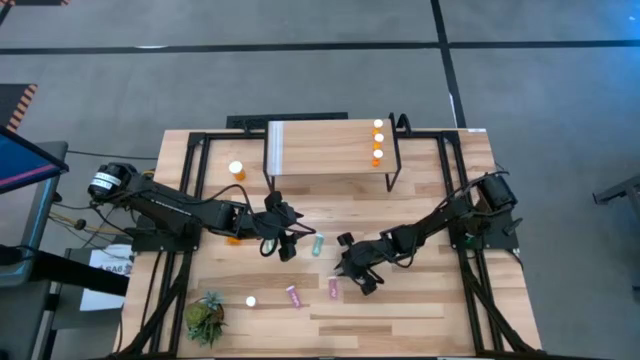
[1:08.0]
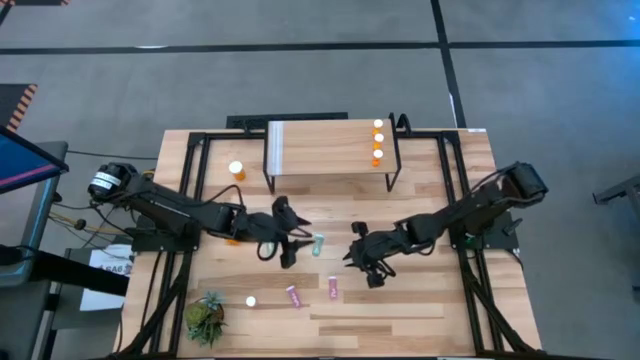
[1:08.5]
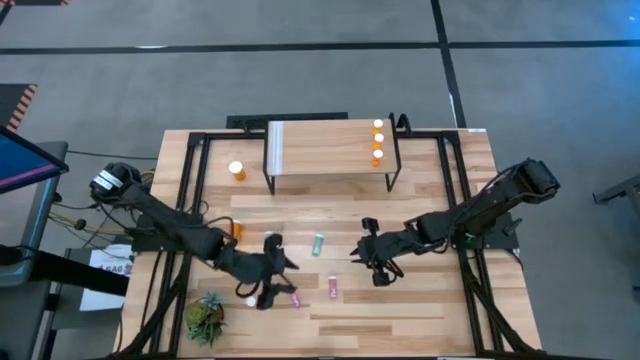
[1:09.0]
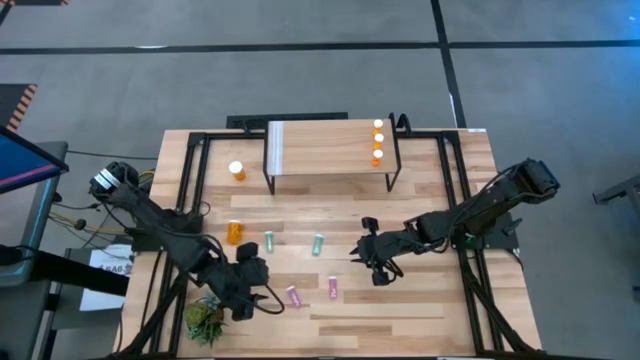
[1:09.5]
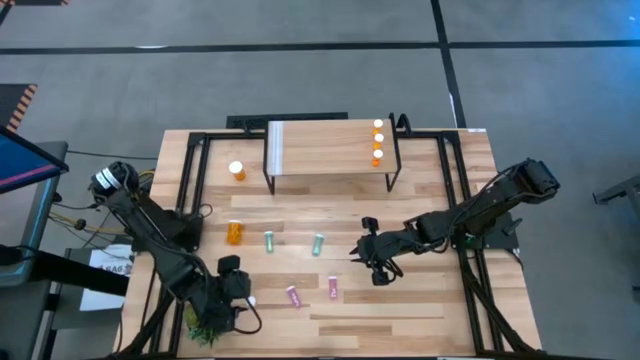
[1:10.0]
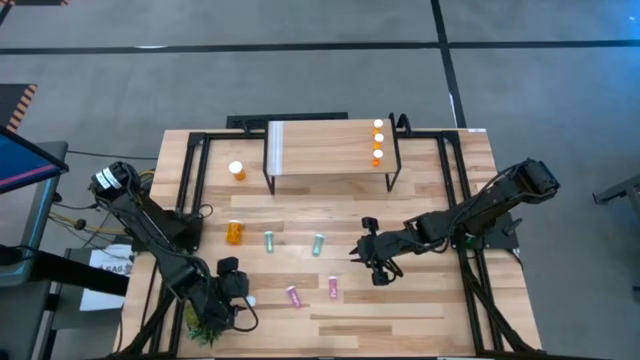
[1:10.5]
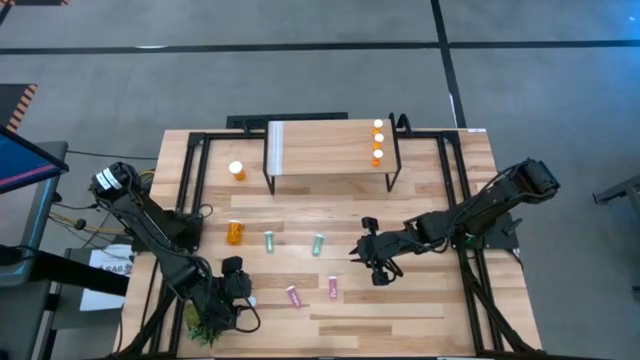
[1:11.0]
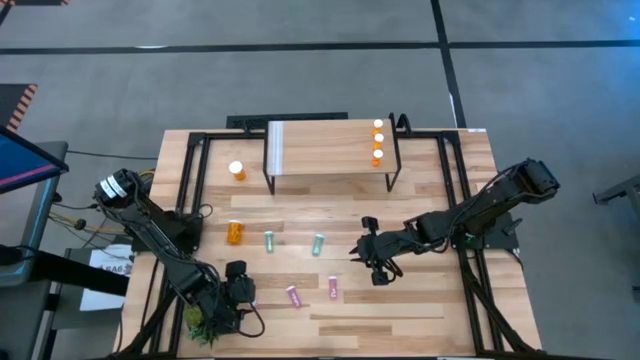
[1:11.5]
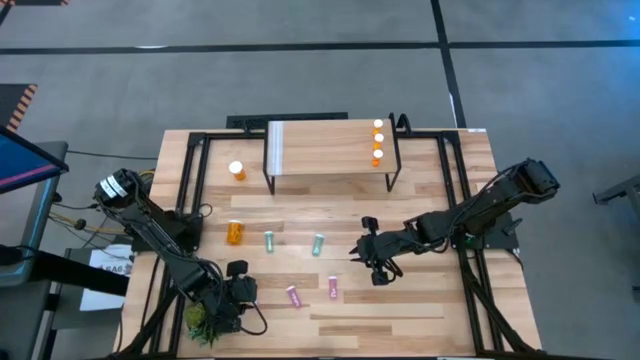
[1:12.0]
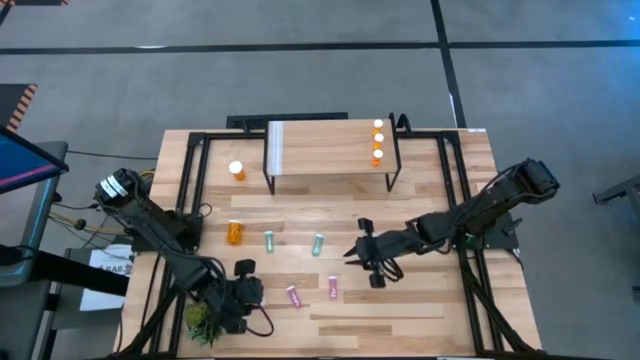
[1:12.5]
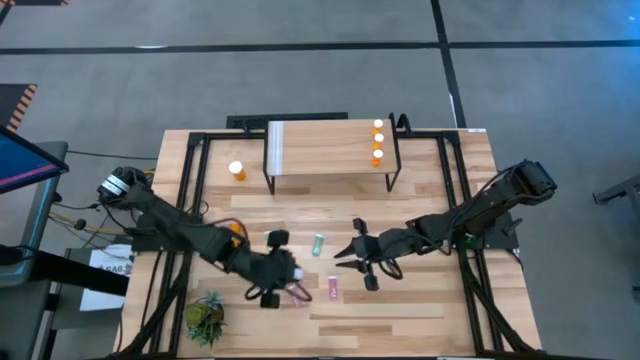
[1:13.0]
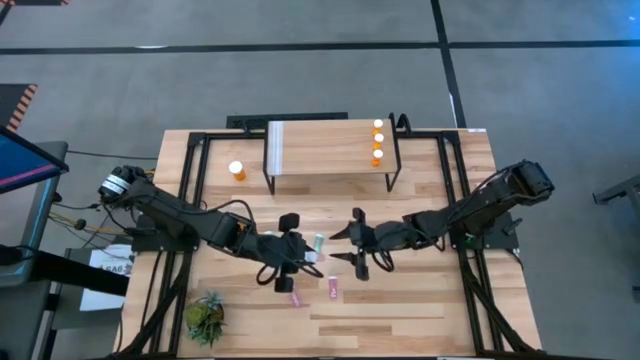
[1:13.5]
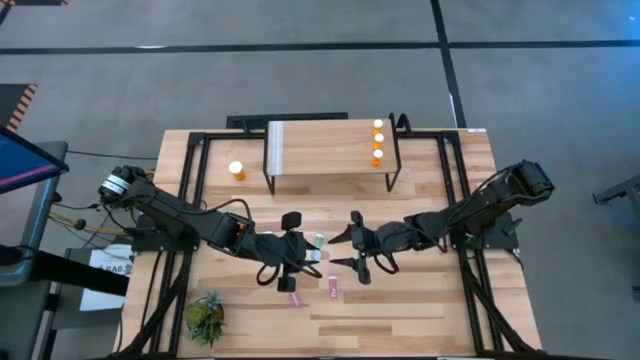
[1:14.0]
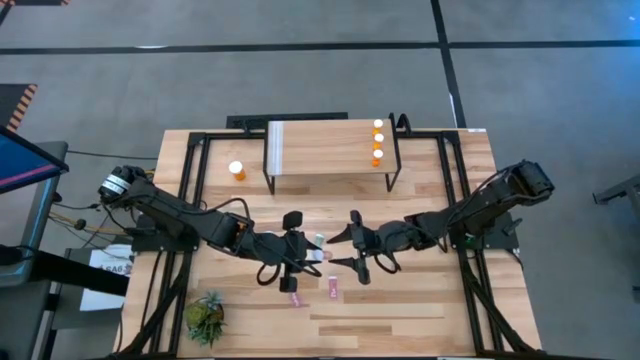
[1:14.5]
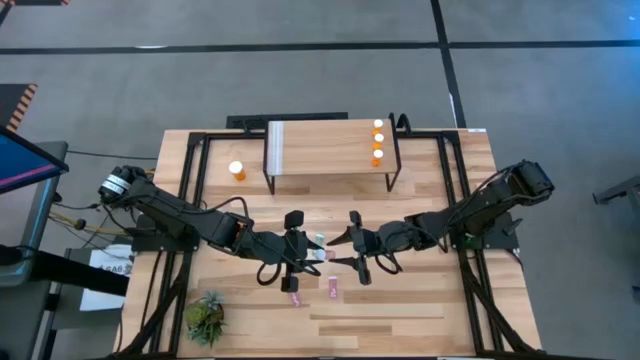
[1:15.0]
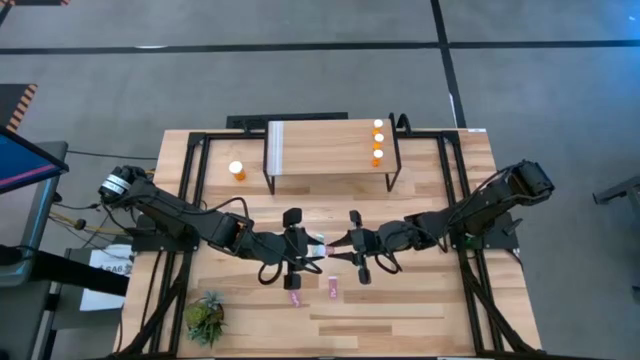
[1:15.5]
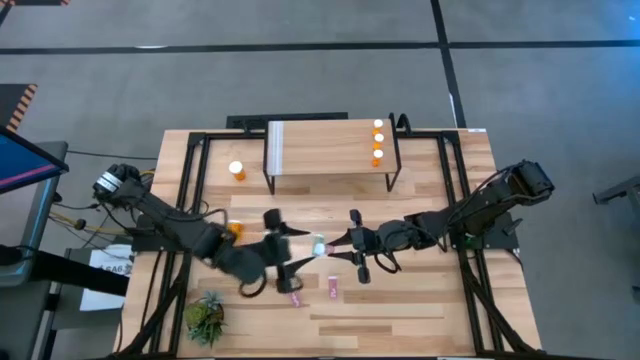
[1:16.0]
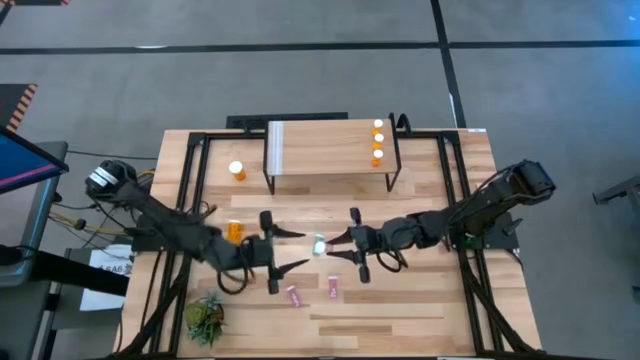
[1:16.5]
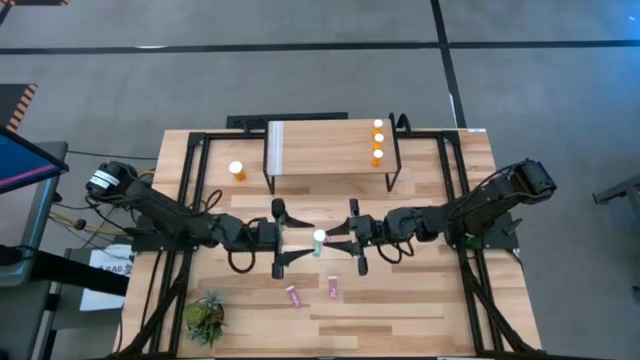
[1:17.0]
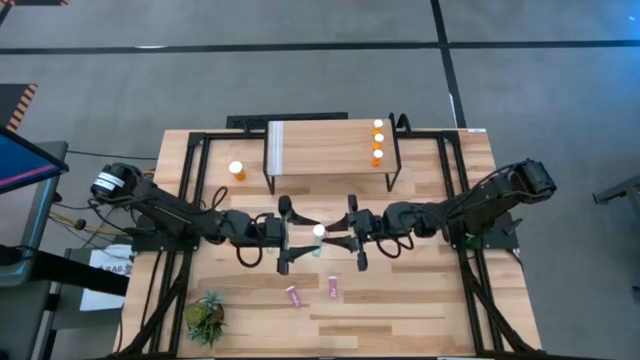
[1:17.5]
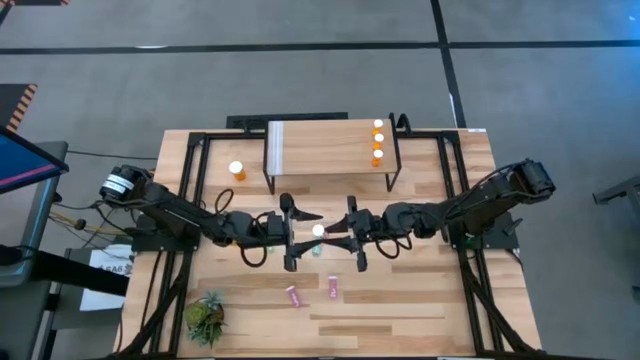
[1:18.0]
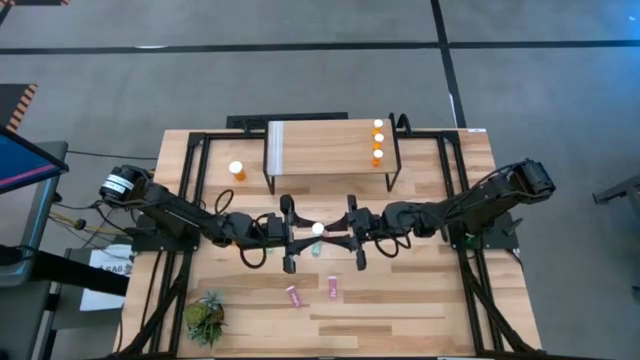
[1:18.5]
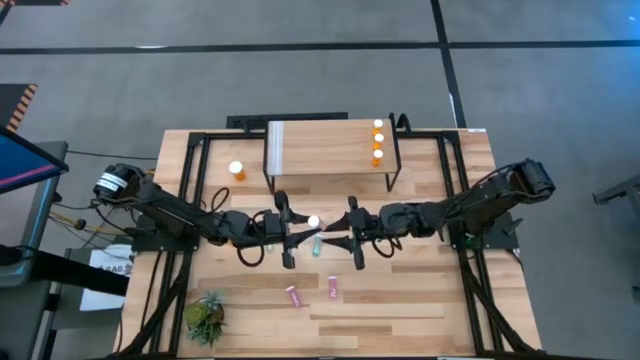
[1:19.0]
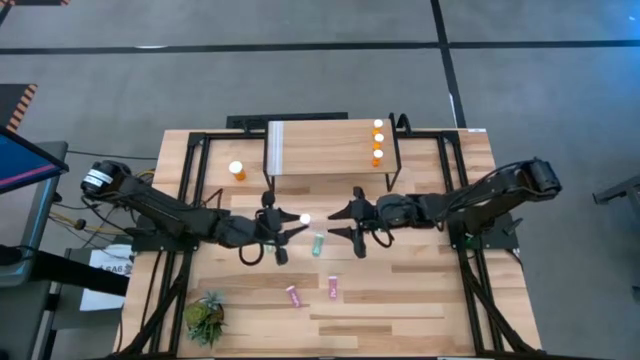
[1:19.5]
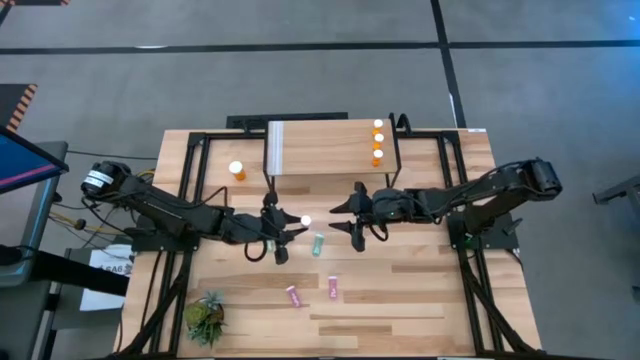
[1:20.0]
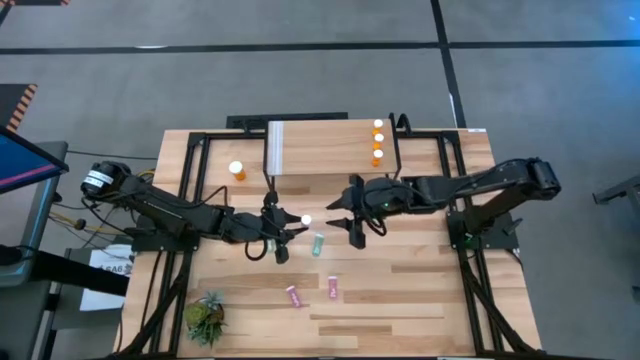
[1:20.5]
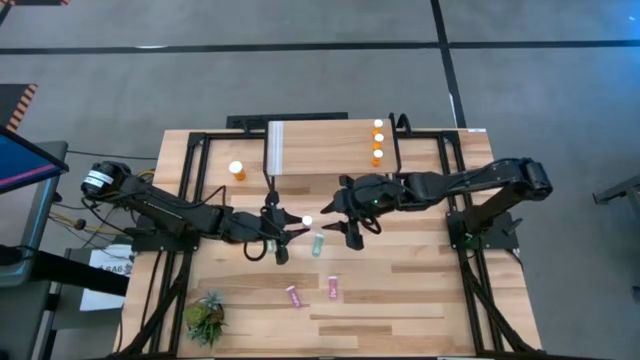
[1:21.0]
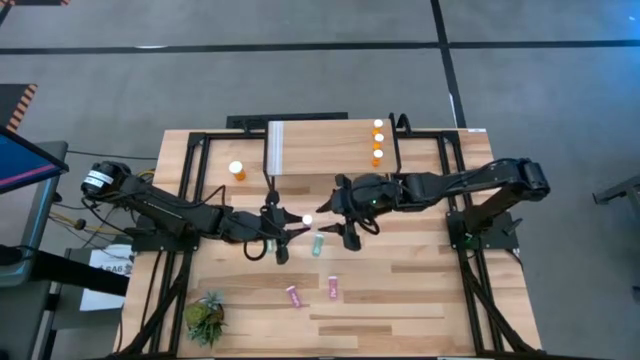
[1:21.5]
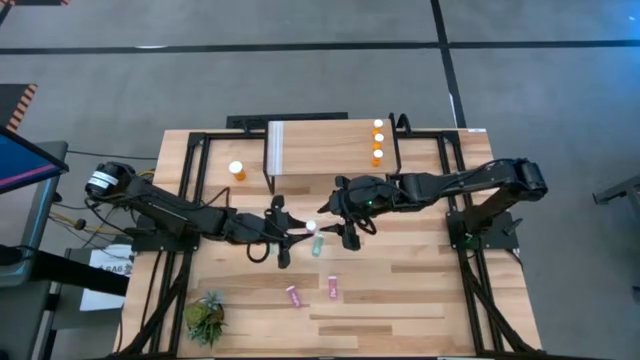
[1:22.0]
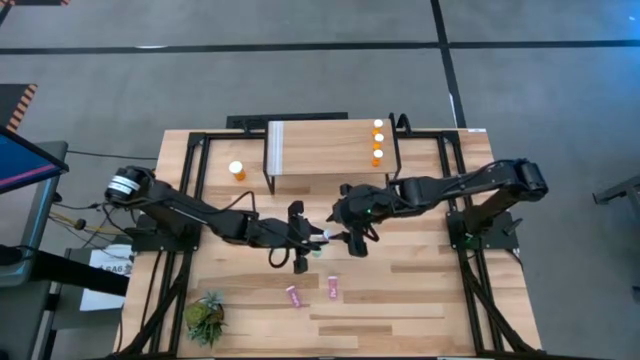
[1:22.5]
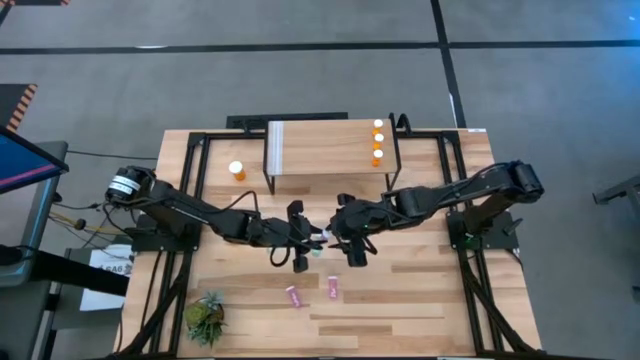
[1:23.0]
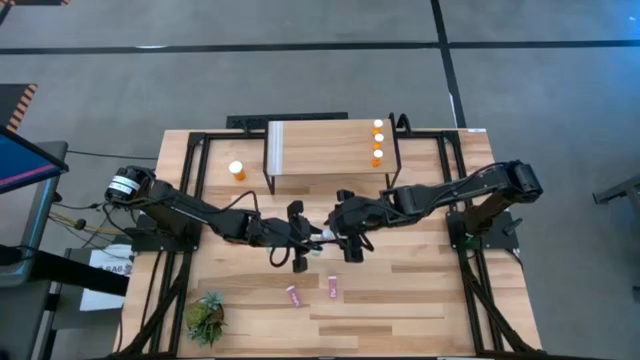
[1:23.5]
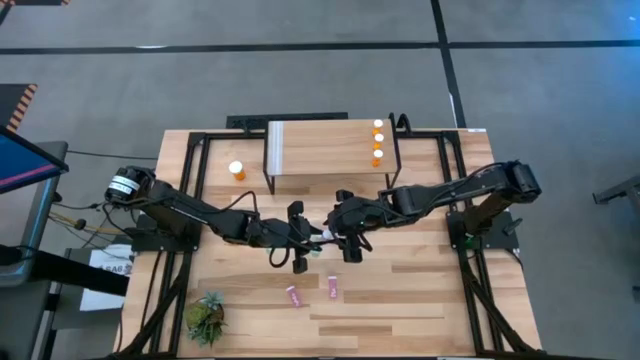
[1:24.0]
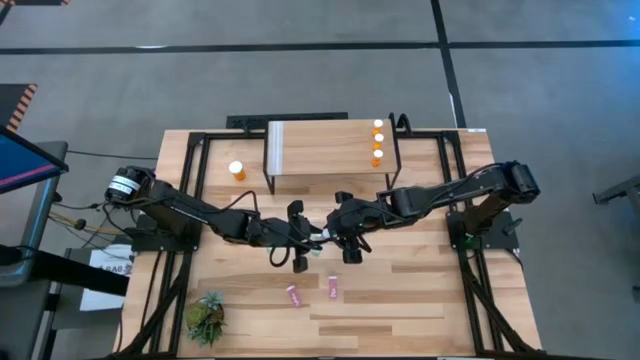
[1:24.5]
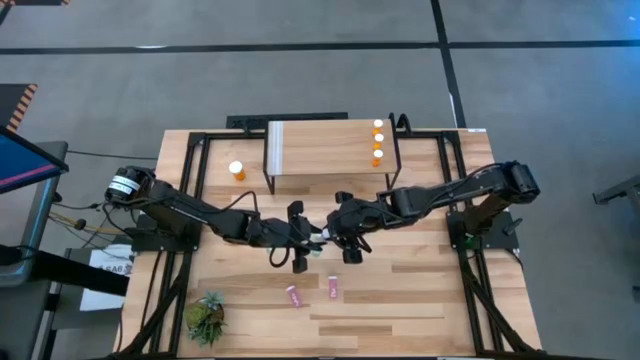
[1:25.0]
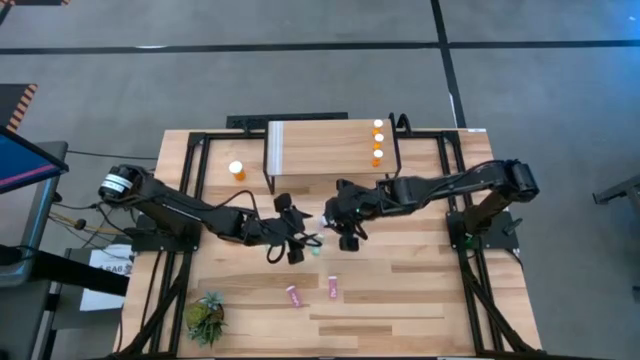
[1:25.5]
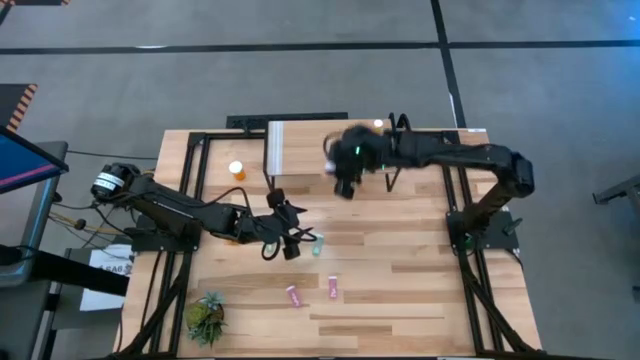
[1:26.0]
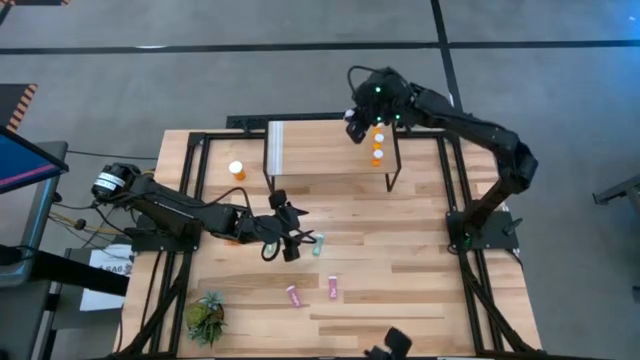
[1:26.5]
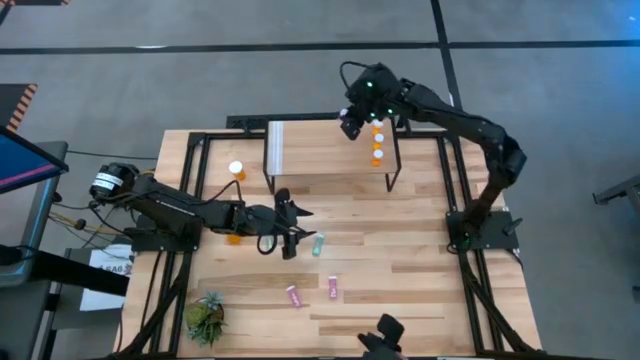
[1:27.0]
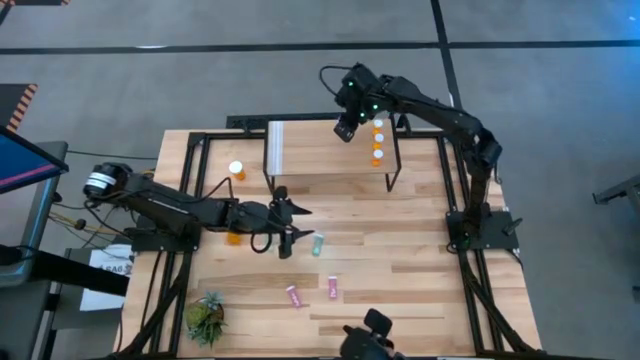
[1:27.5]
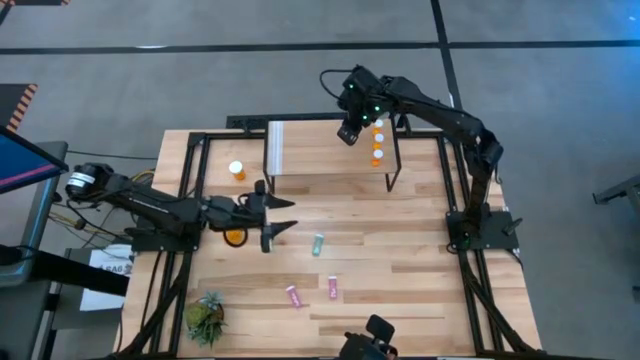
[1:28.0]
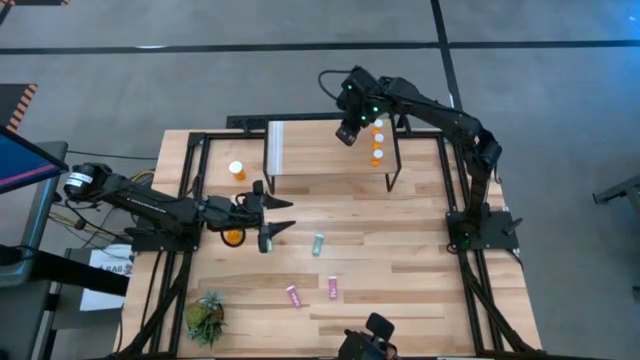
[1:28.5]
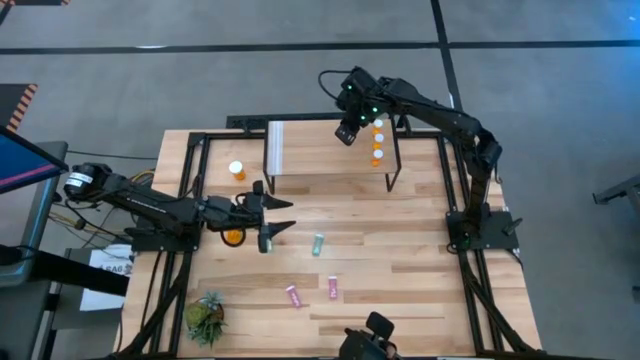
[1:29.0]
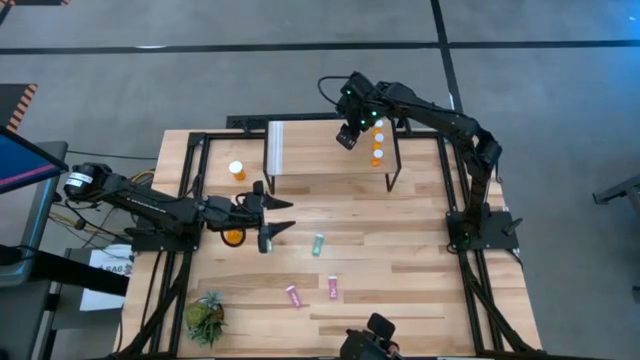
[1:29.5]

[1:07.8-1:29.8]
Task: Pick and place medicine bottles onto shelf by color
Put the left pink pill bottle on the shelf
